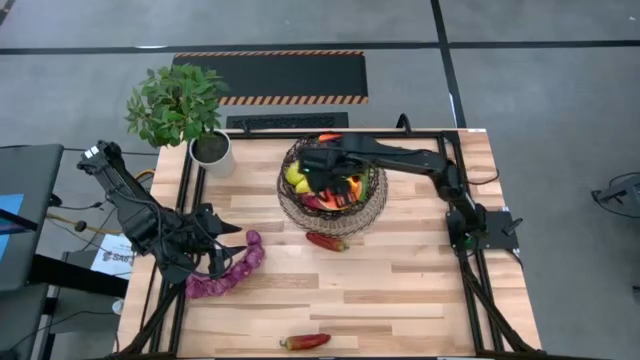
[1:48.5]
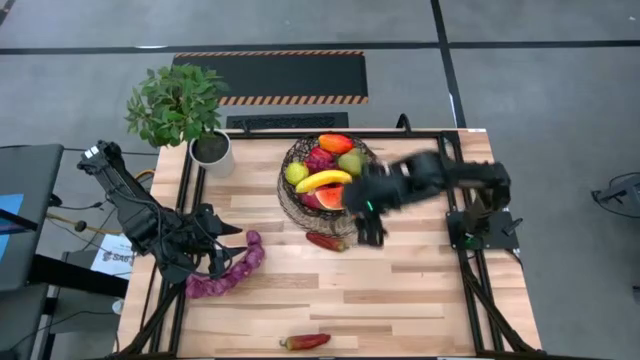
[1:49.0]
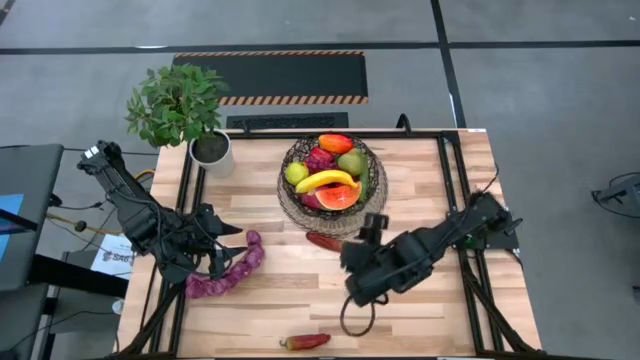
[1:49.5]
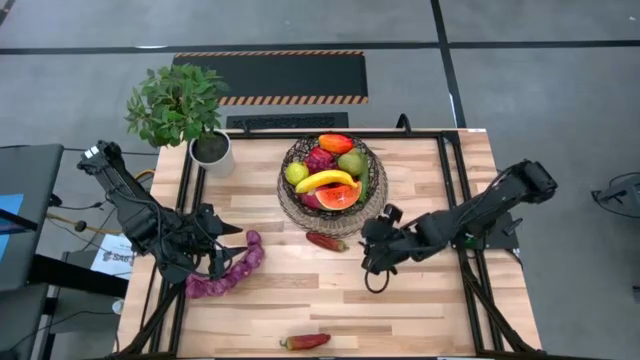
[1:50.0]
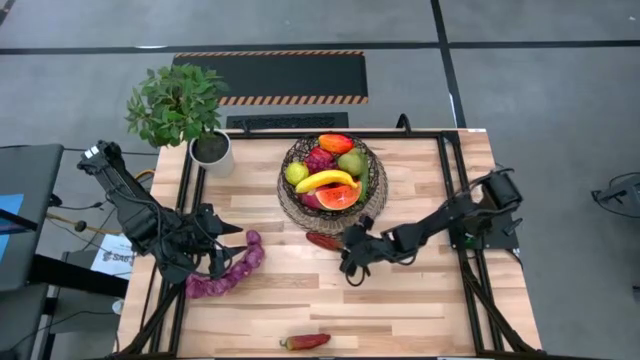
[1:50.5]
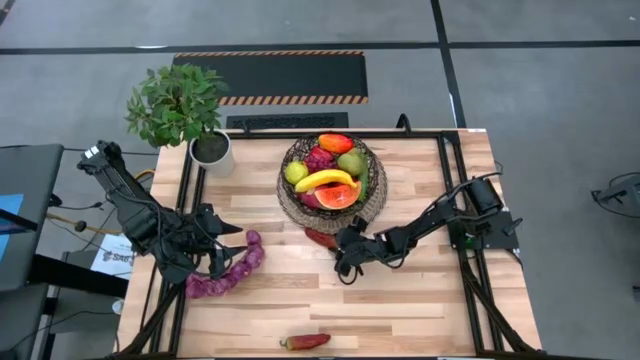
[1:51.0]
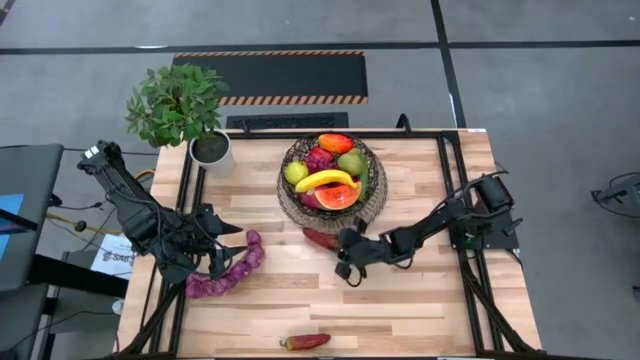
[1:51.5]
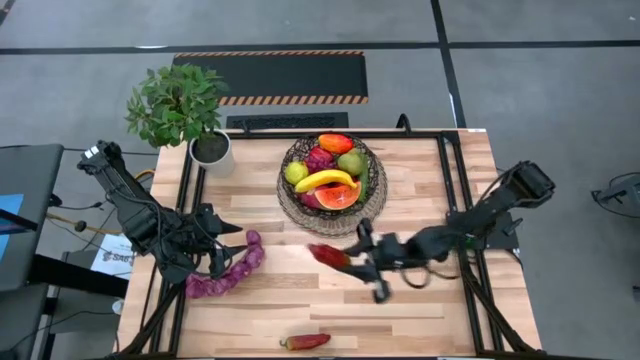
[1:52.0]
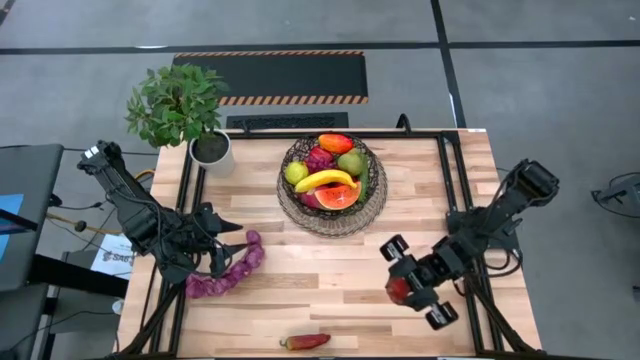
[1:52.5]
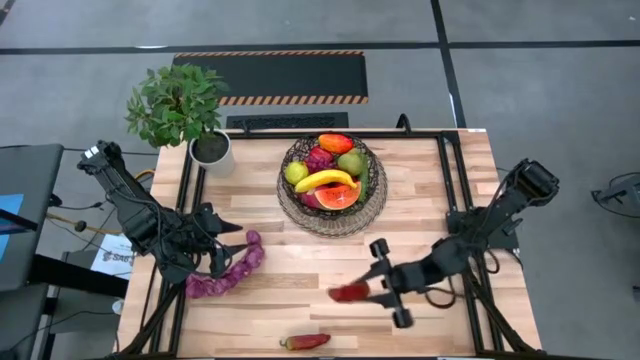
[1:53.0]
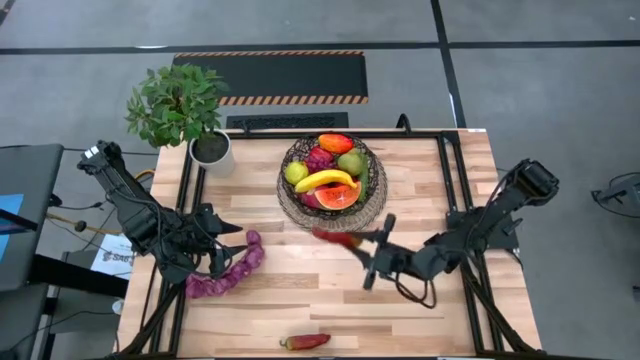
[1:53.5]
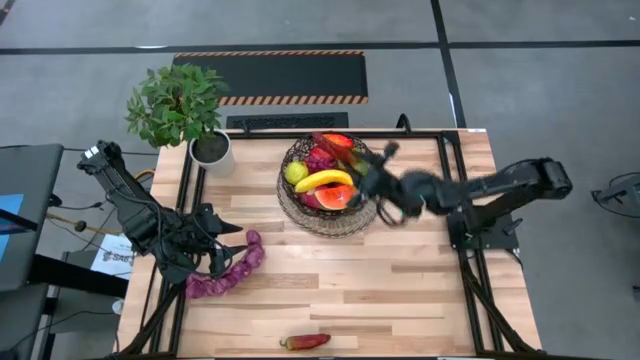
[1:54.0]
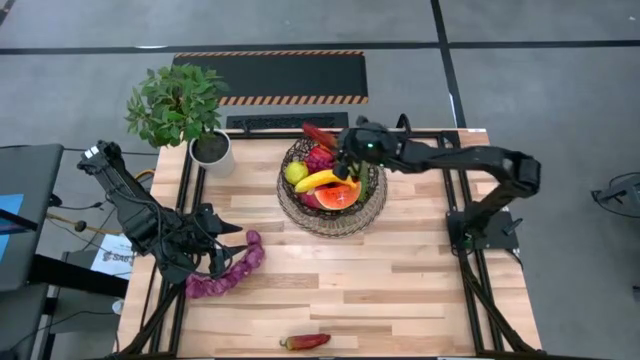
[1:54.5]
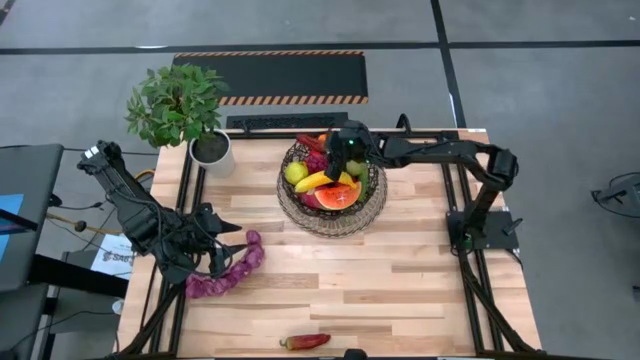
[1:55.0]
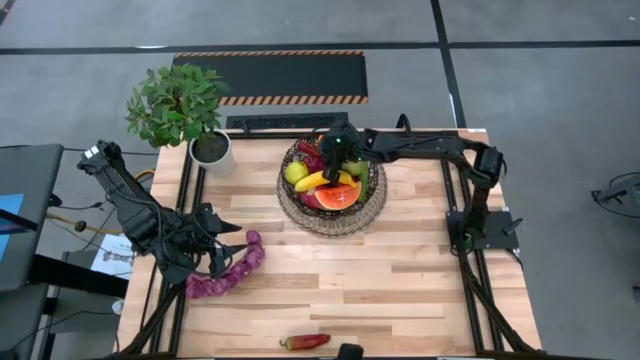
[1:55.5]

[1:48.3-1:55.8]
Task: Build produce basket
Put the top red chili pepper into the basket

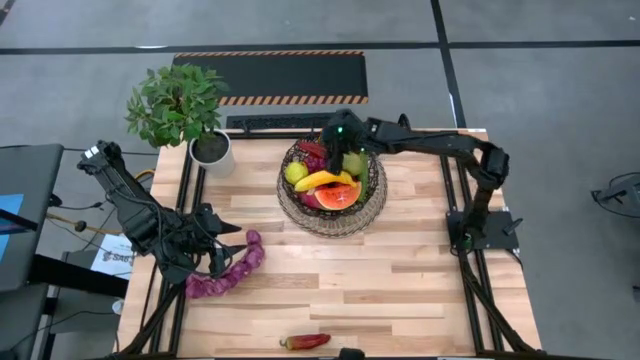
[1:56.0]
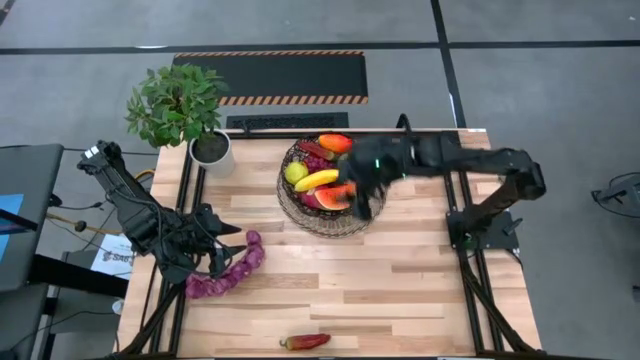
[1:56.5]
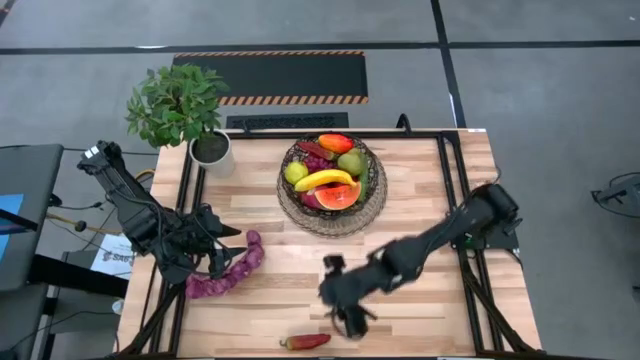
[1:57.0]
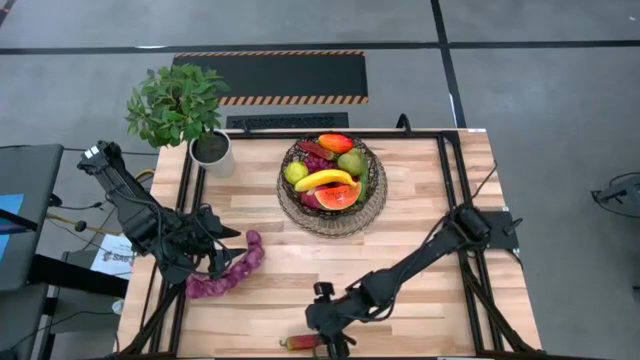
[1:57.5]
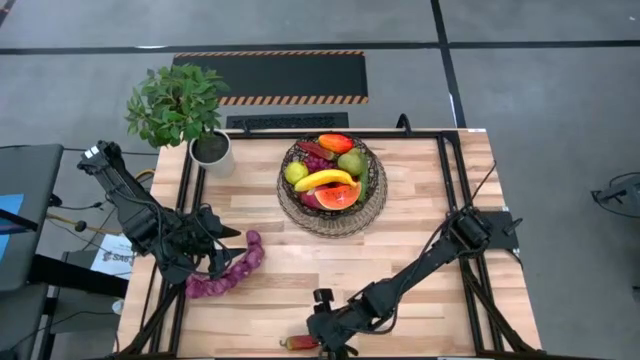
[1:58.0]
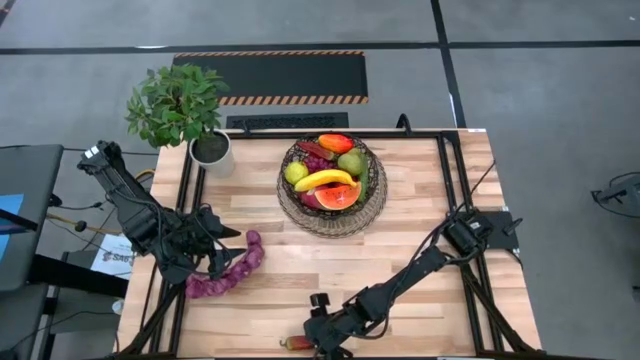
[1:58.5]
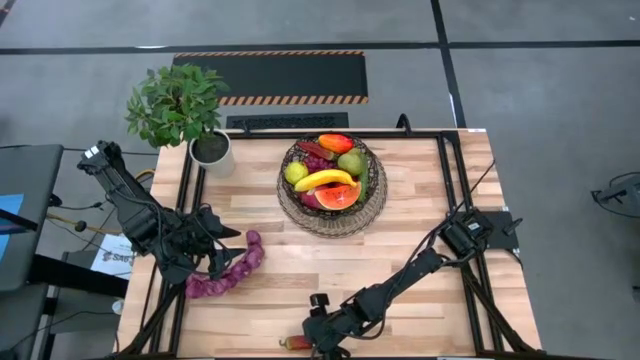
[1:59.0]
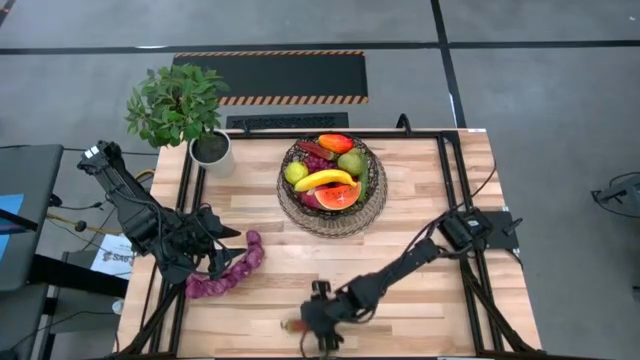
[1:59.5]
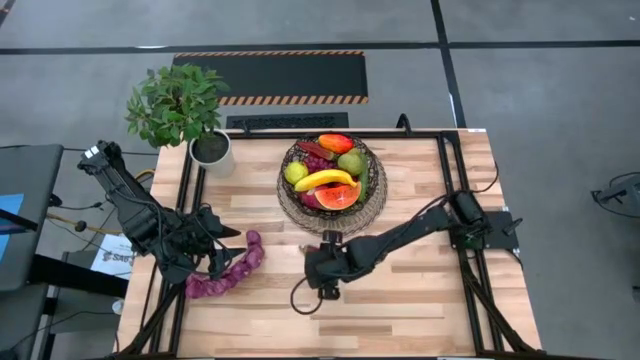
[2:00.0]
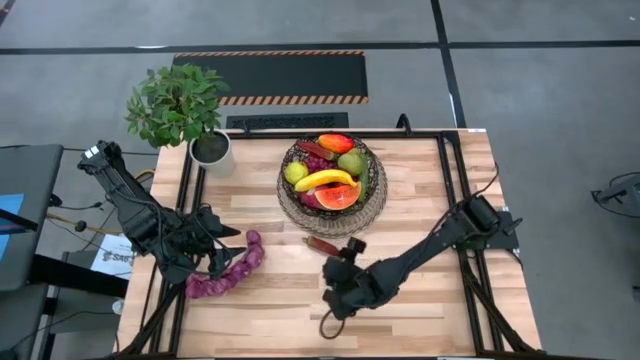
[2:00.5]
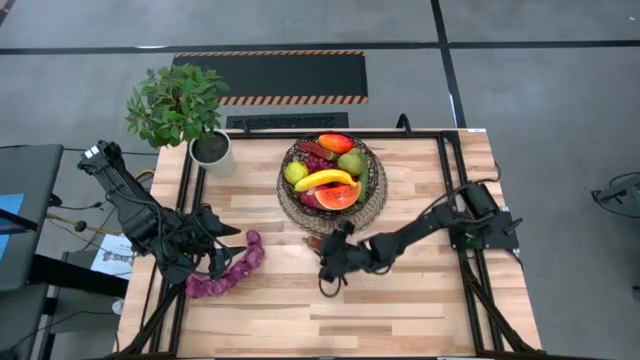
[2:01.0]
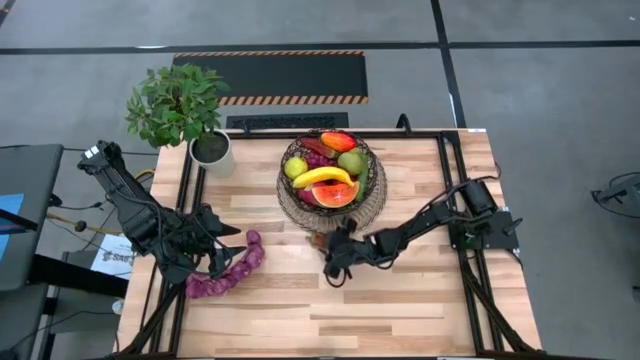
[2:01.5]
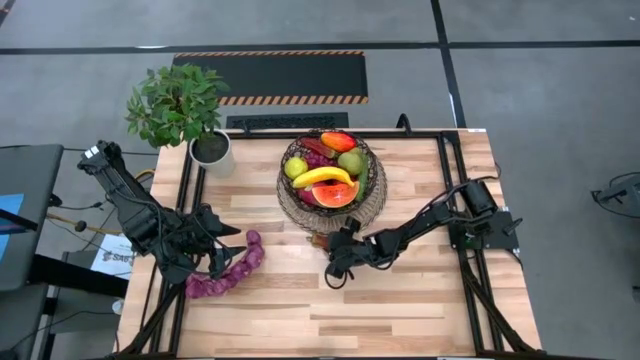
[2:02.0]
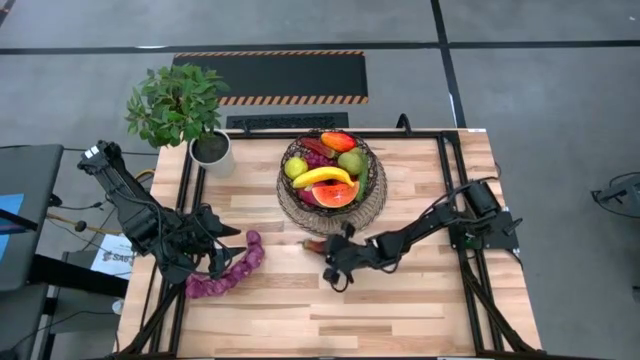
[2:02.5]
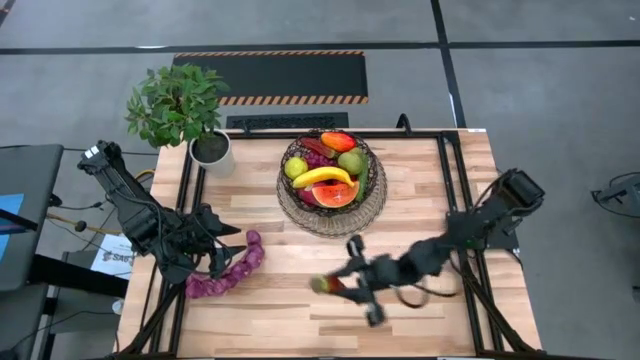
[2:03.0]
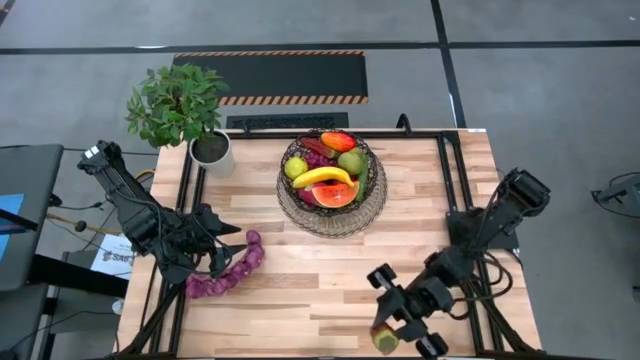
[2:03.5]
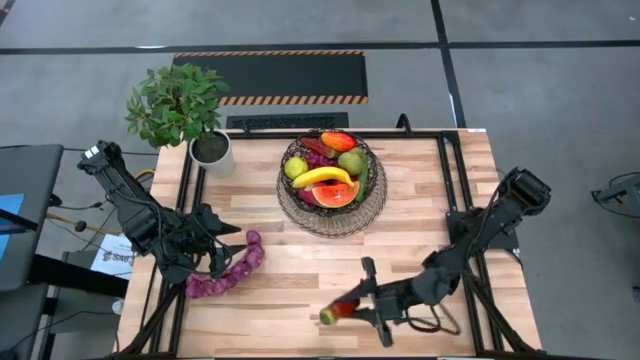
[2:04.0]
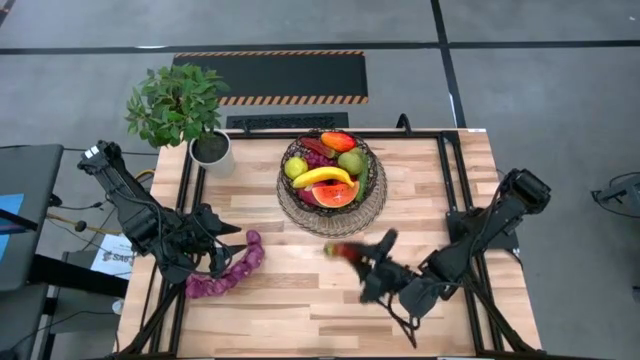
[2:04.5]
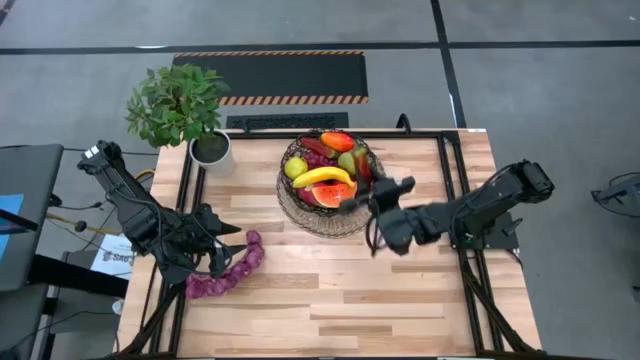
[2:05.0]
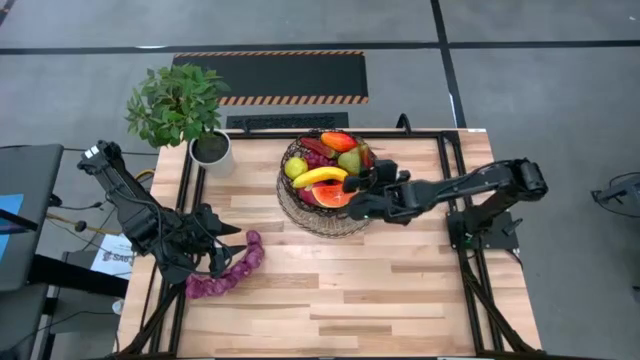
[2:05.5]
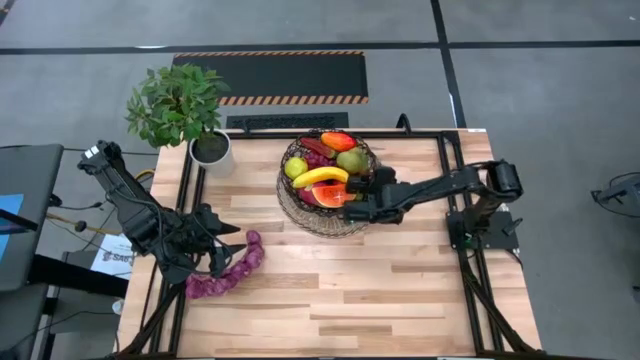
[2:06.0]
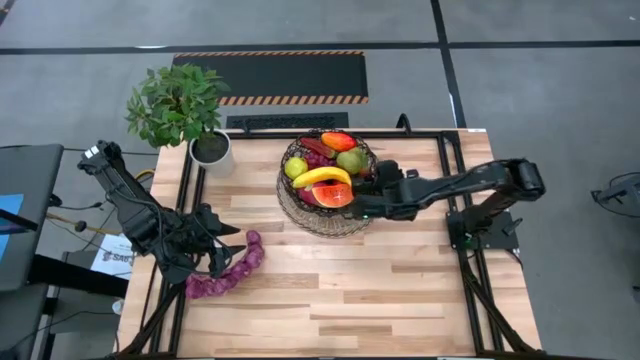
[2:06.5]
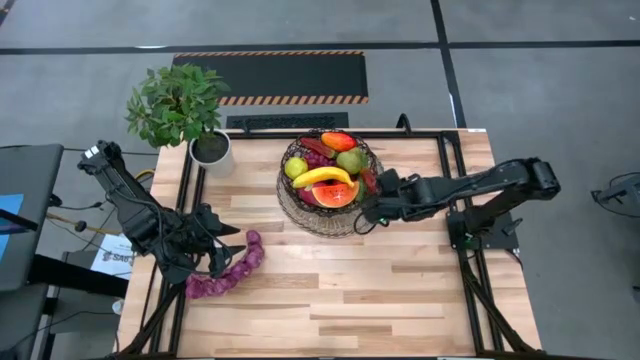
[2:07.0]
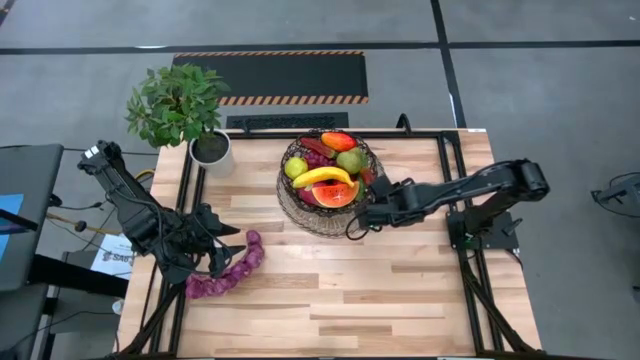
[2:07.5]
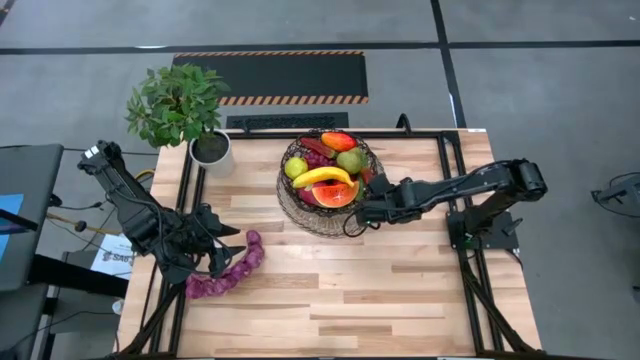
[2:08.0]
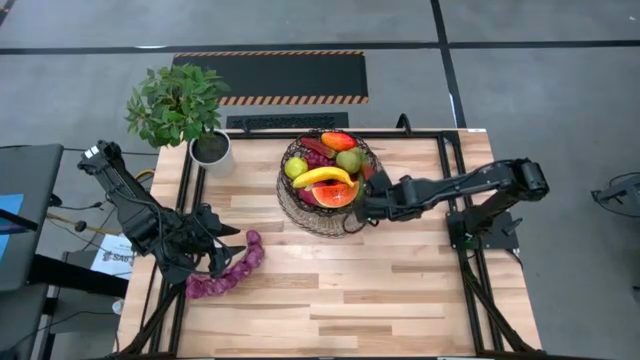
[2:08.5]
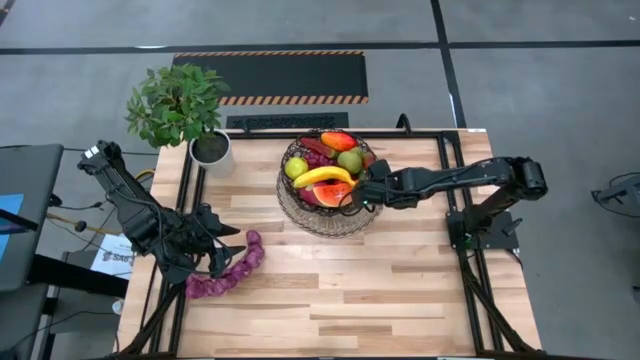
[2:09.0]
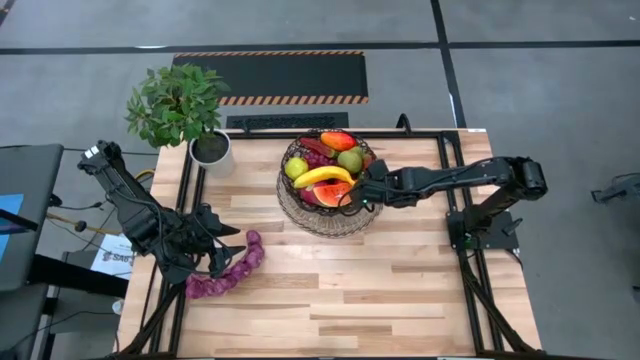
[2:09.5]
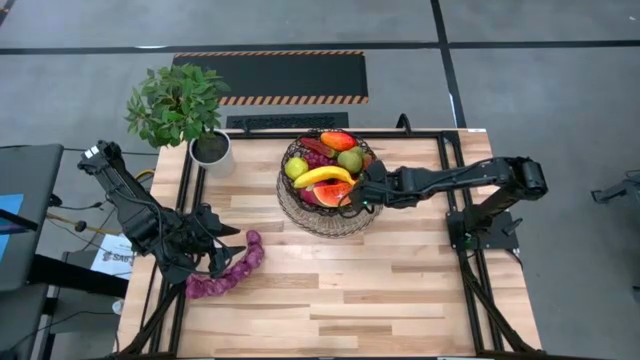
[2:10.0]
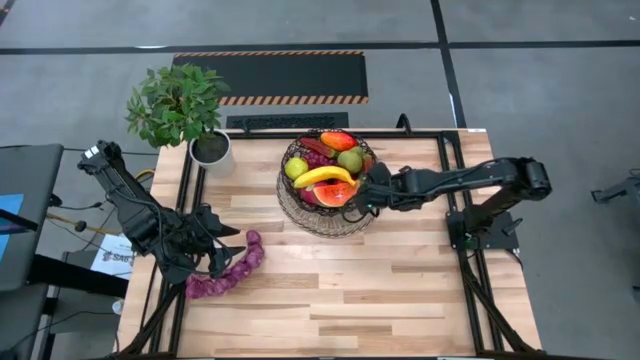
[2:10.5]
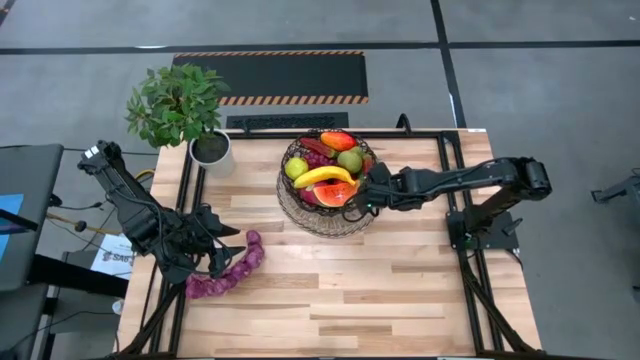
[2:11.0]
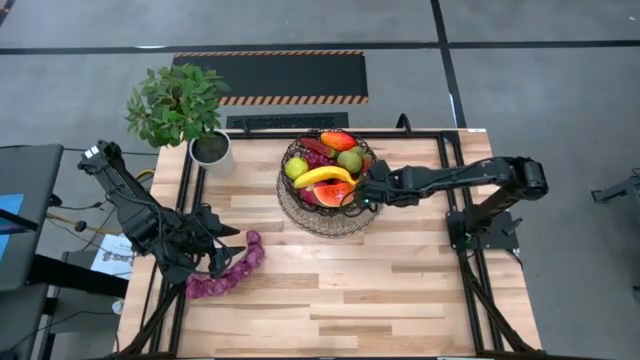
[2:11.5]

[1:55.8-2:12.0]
Put the red chili pepper into the basket
